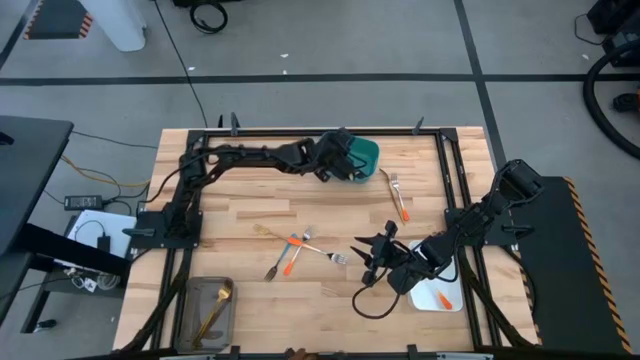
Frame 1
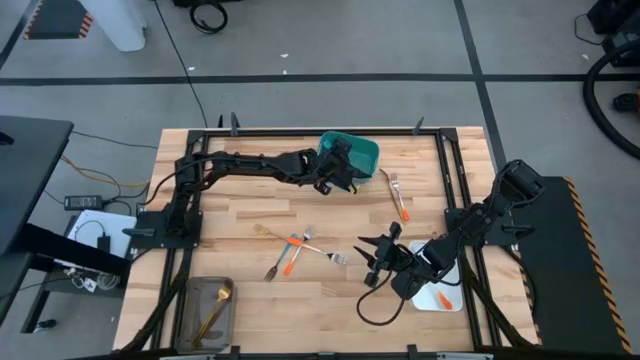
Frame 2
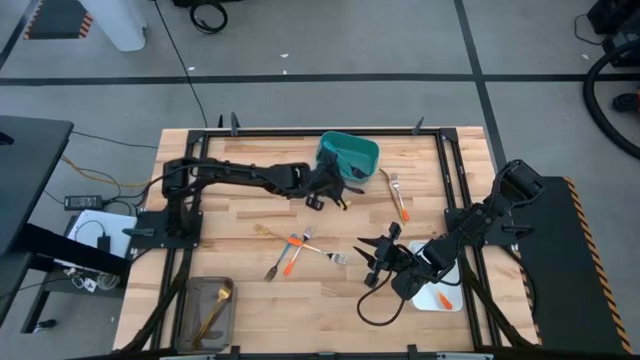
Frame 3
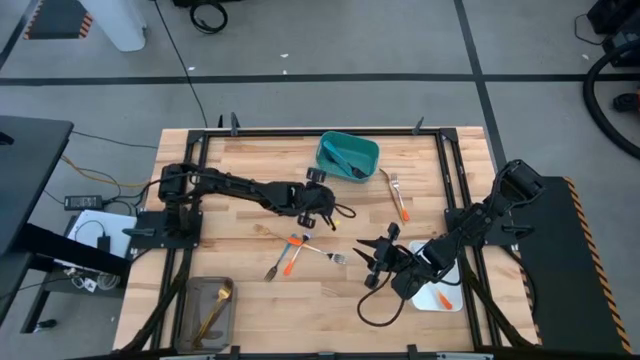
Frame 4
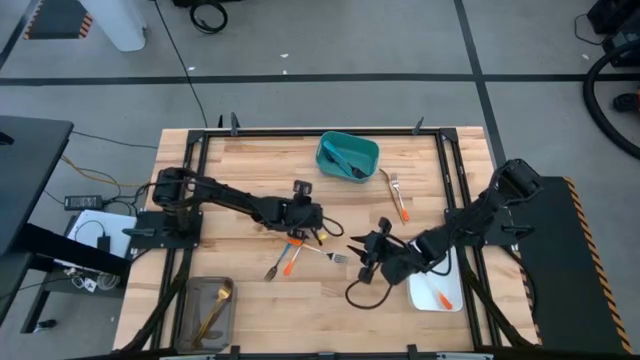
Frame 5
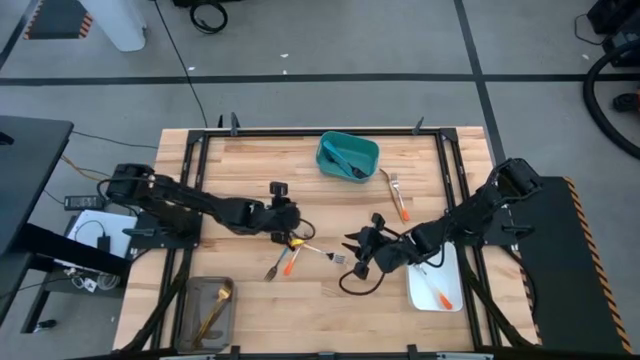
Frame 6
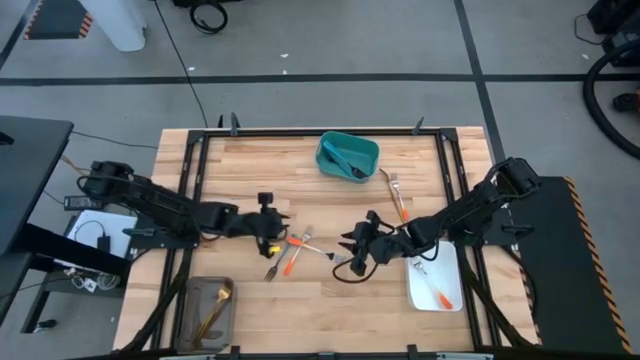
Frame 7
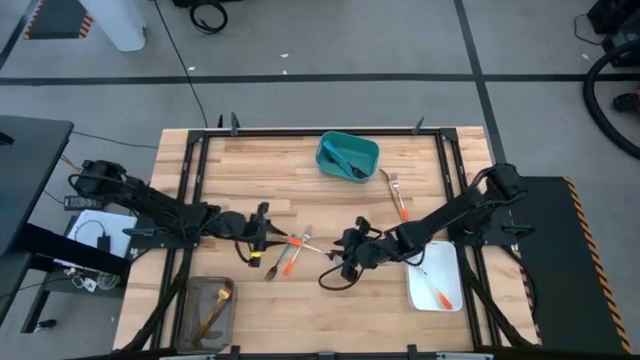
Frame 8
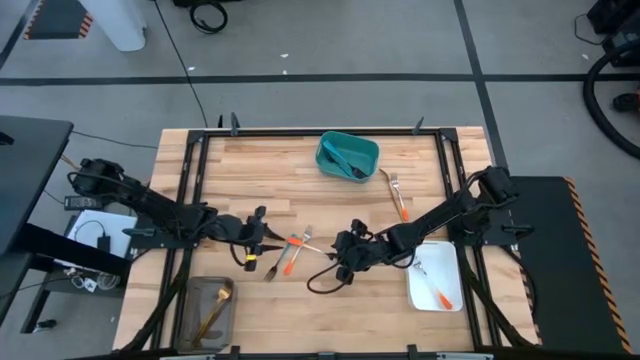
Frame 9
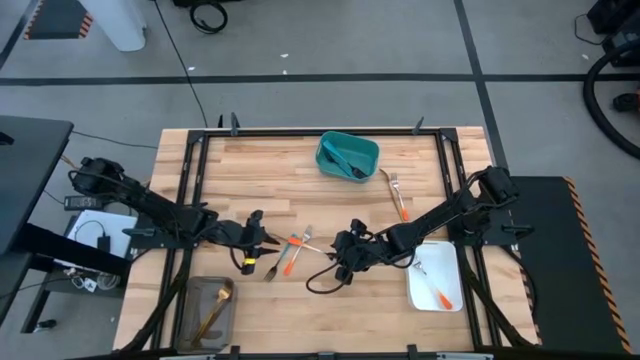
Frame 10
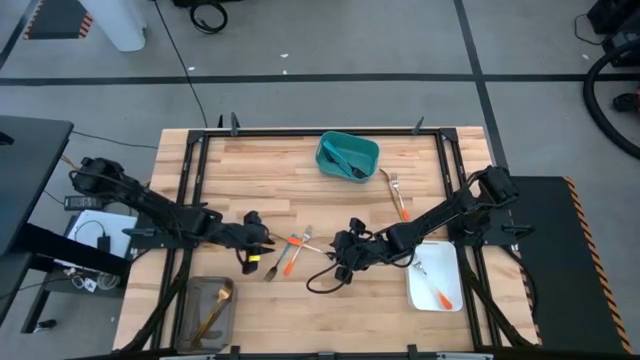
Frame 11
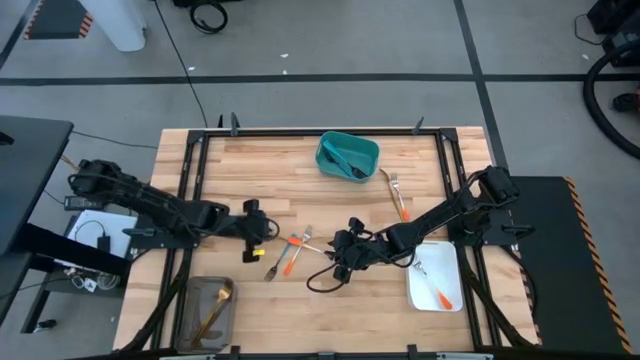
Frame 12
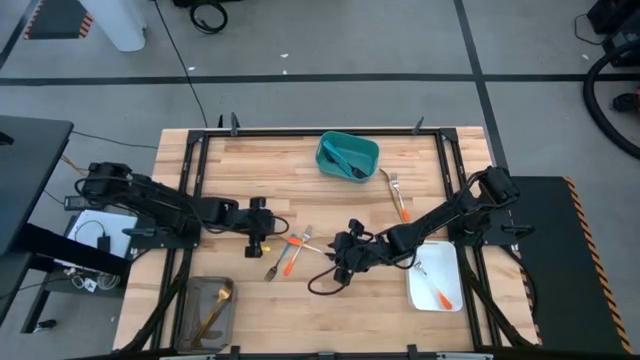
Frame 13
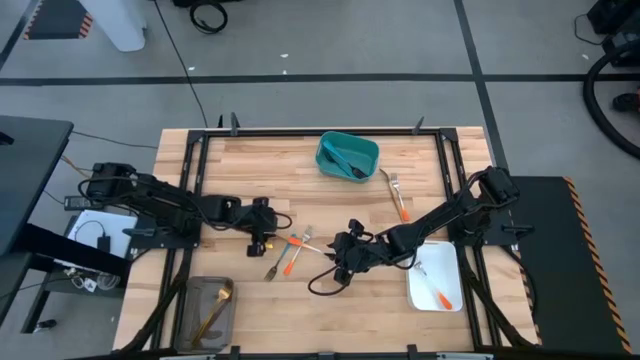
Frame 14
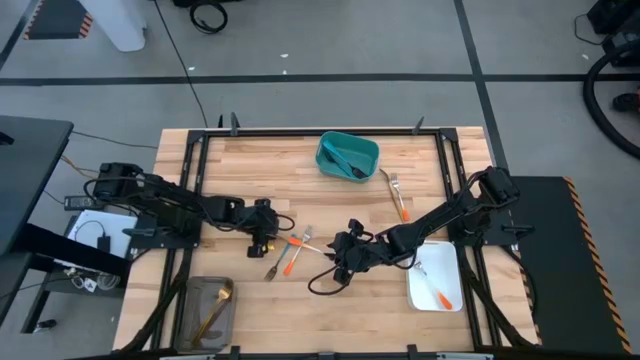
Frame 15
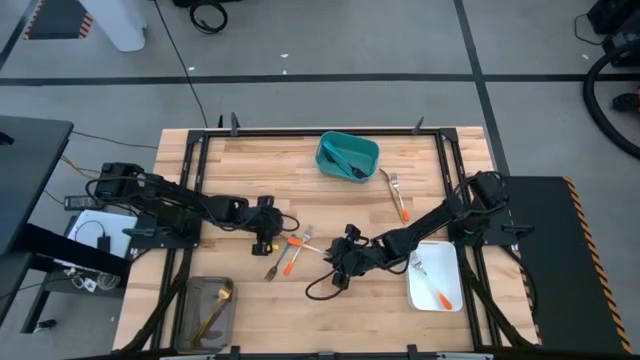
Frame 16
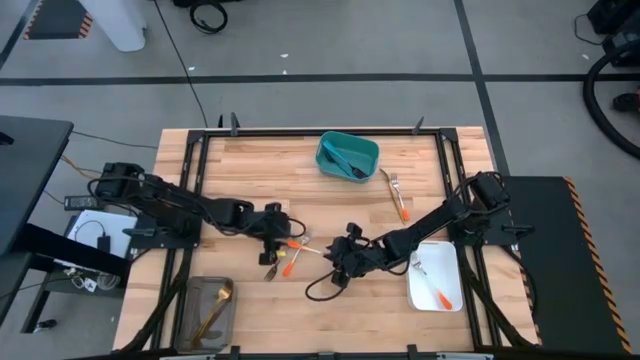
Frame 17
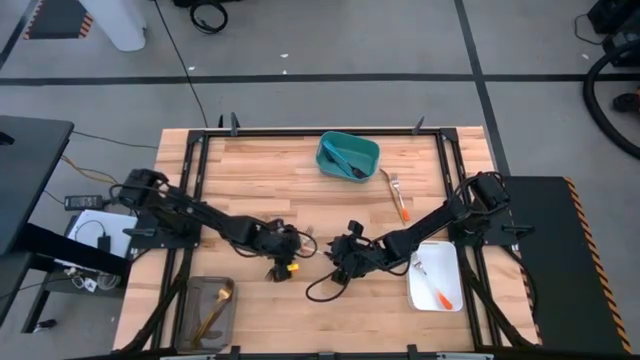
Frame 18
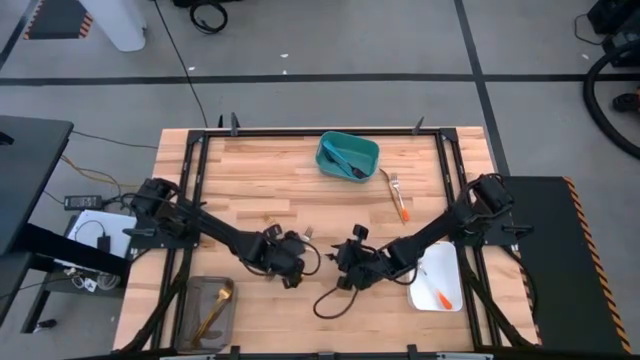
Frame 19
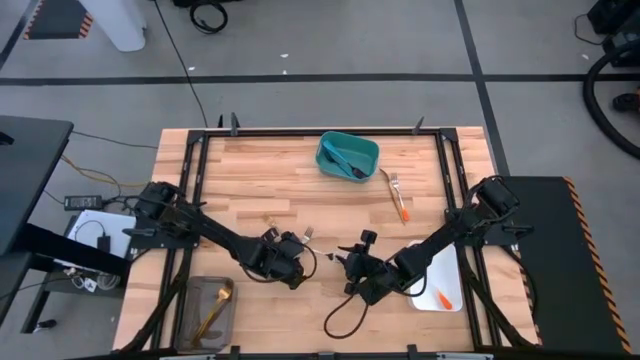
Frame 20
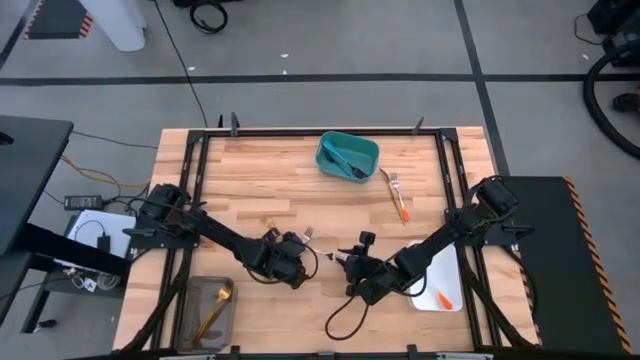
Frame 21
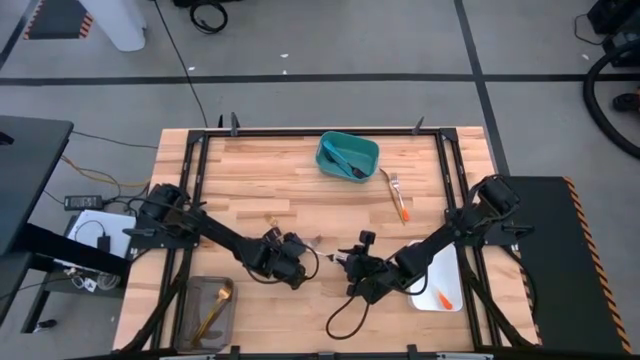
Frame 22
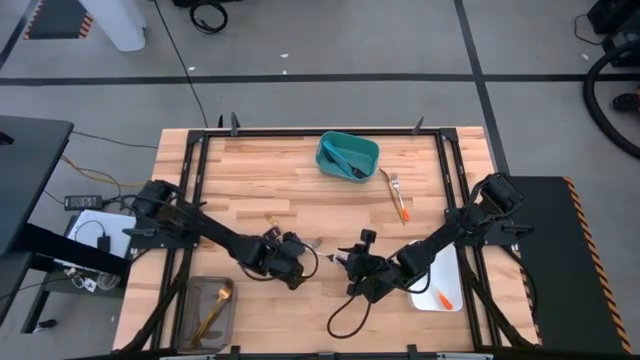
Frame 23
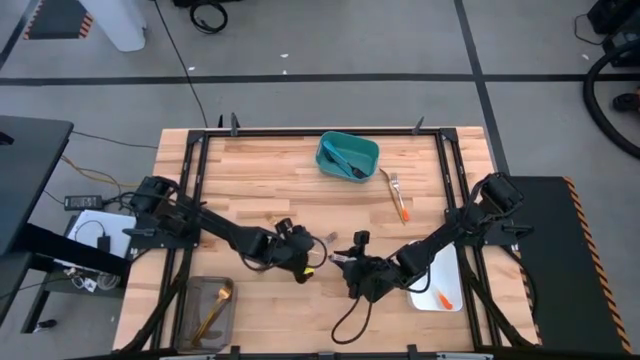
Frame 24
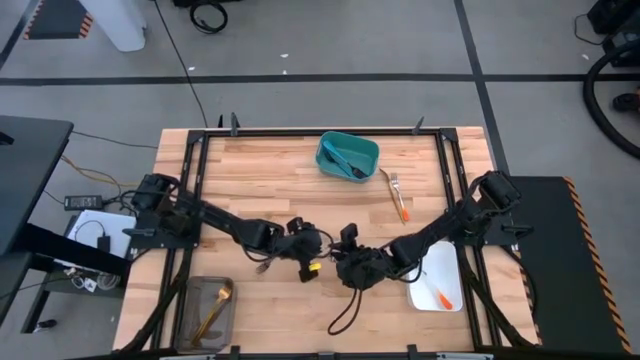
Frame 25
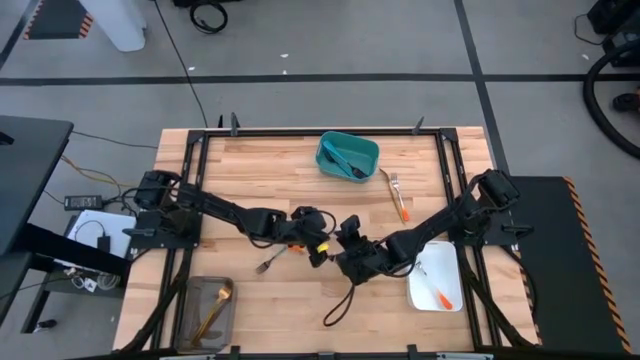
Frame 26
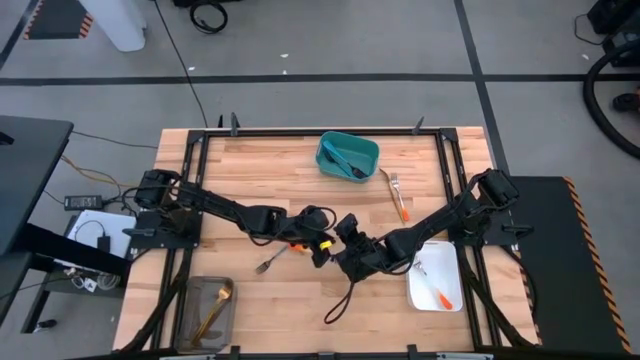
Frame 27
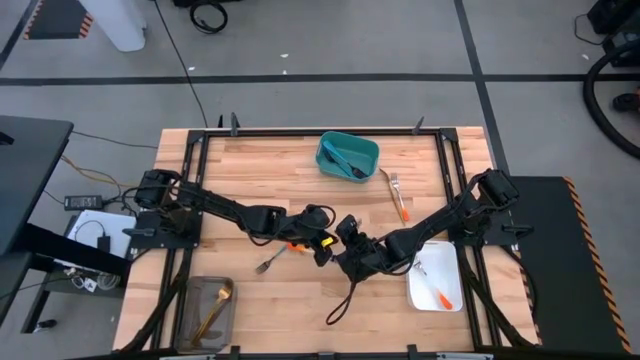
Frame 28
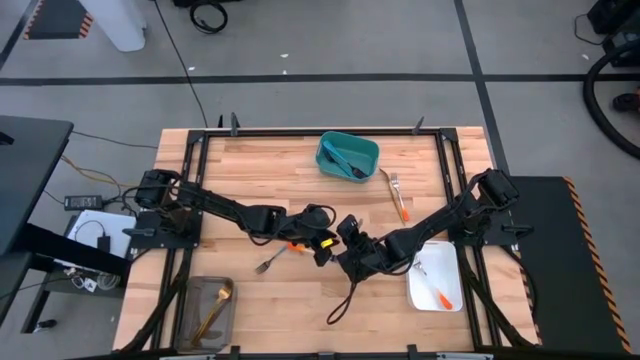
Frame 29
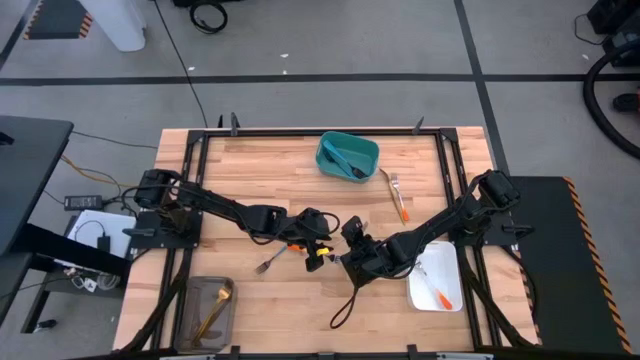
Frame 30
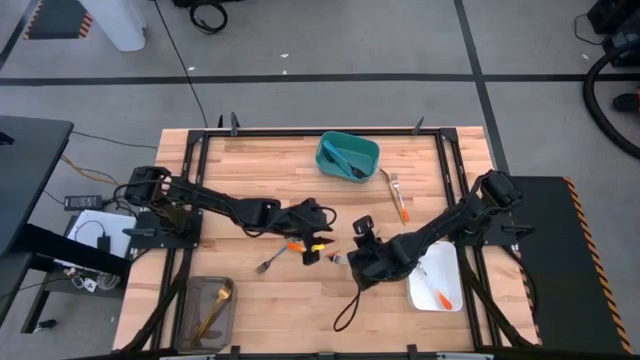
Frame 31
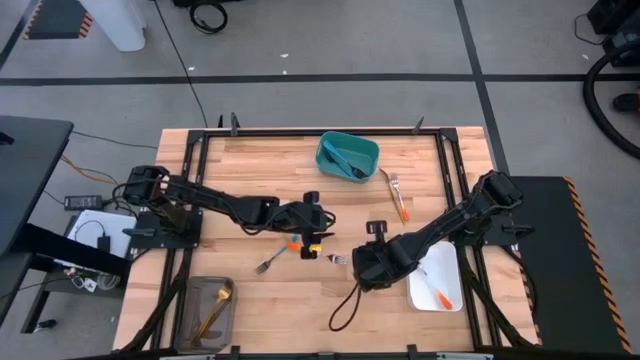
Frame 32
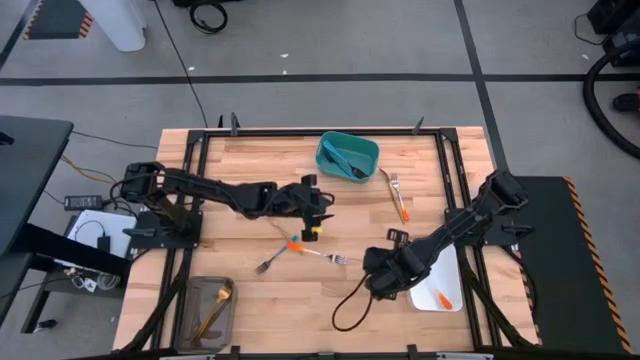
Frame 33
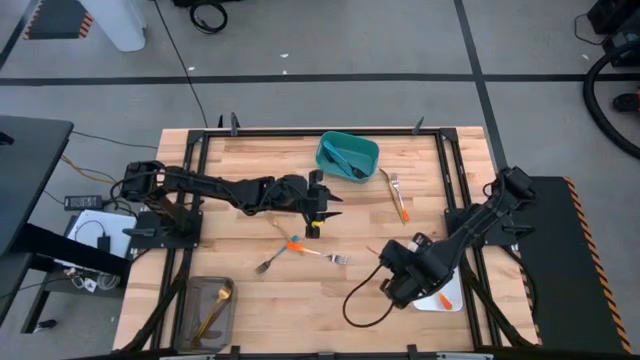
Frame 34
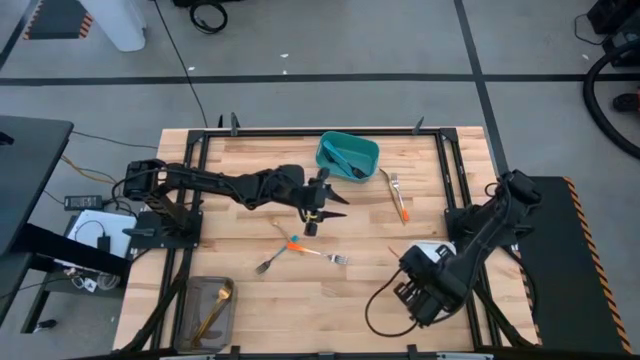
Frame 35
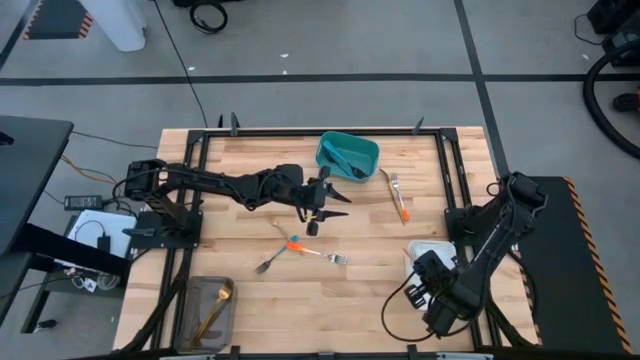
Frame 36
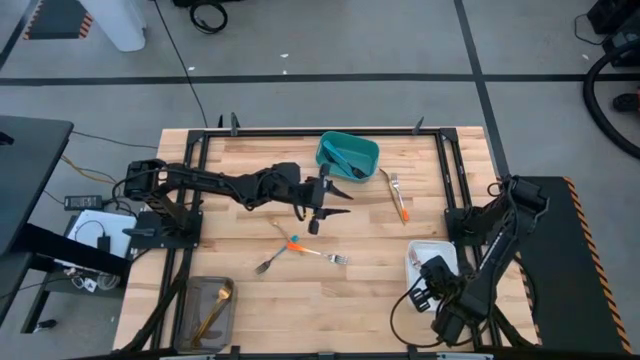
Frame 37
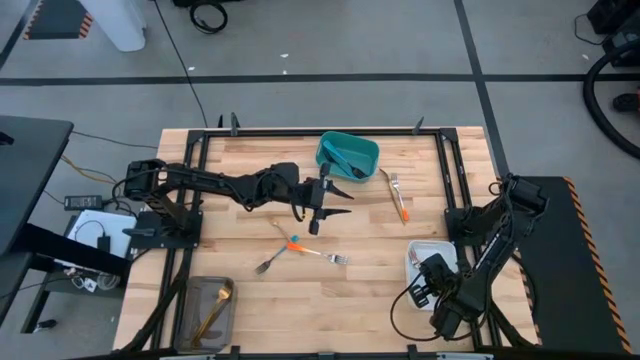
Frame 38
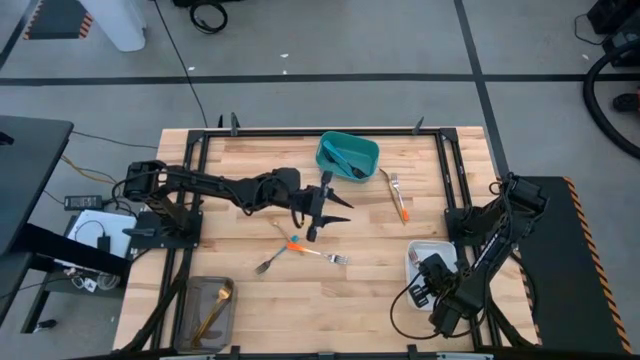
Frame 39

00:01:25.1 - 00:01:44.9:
Task: Sort silverware by color (type)
Put the orange fork into the white bin

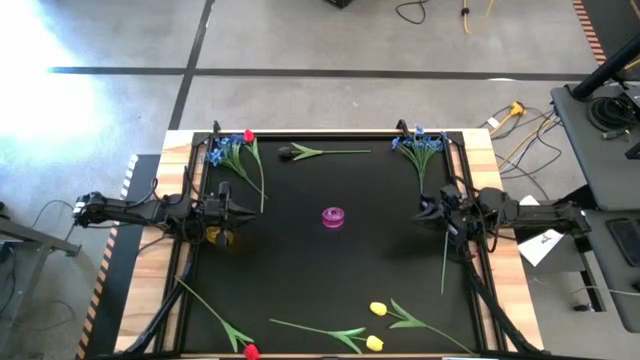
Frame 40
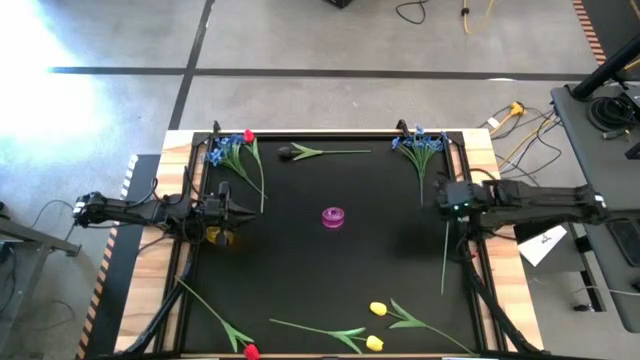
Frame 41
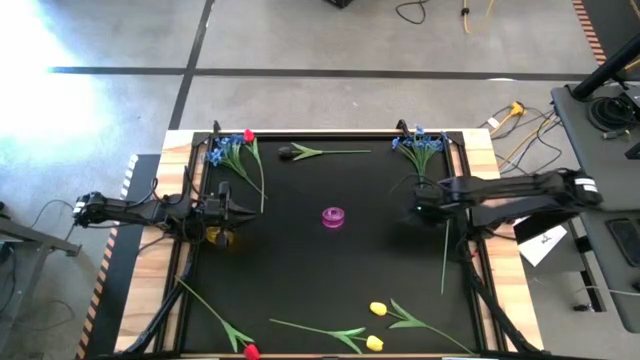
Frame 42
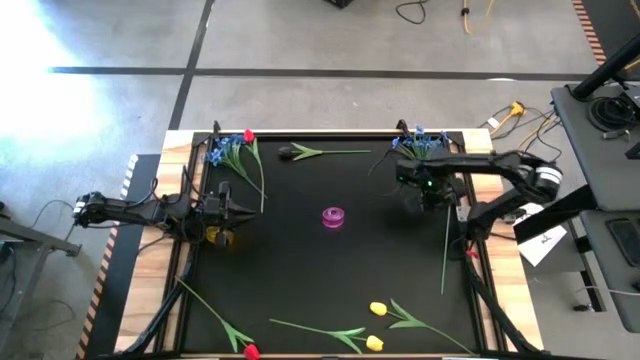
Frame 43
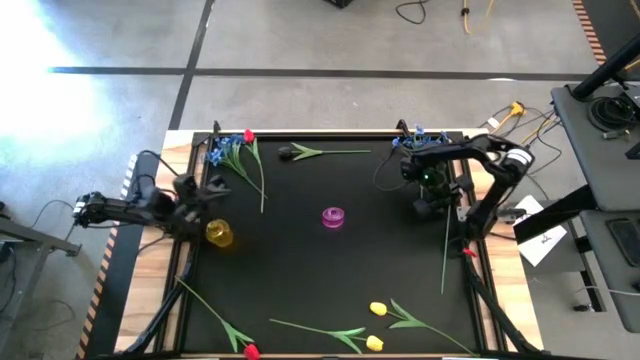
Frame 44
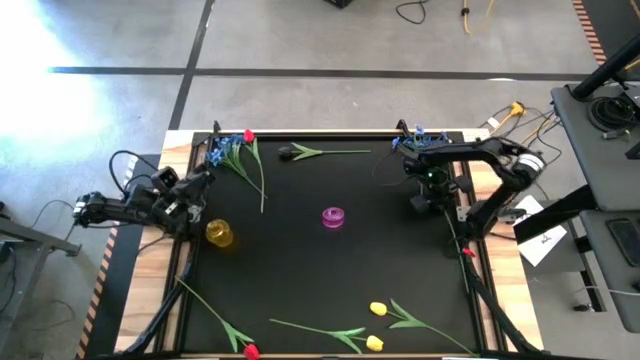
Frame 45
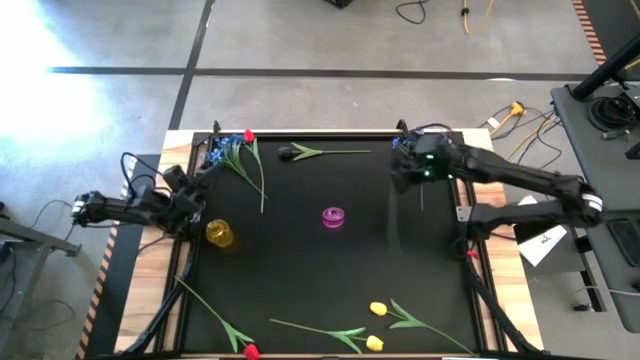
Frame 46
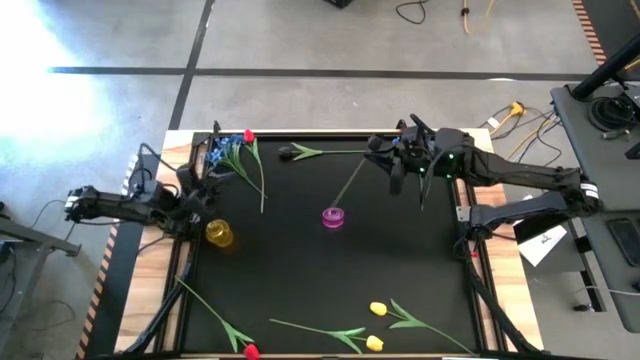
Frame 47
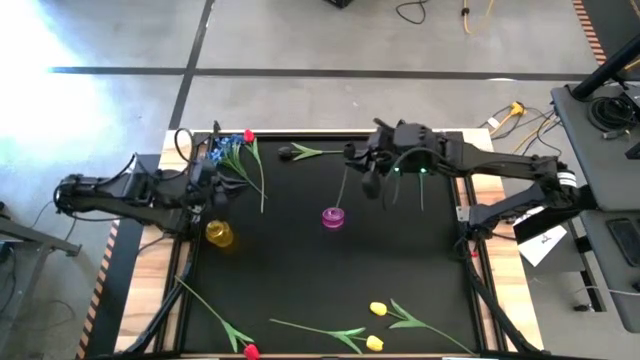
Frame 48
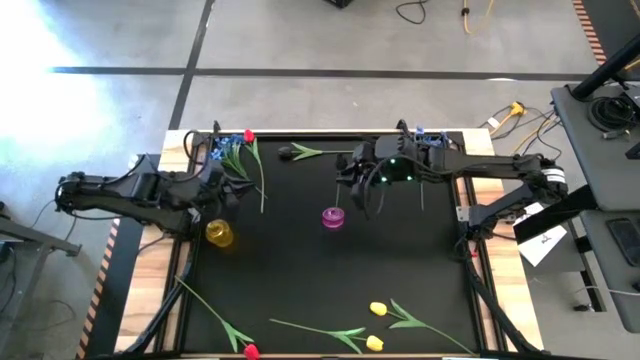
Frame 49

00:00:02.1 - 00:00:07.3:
Task: Sort flowers into vase by color
Put the right black flower into the pink vase
